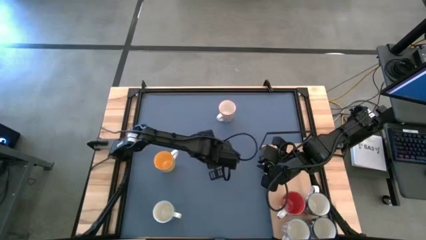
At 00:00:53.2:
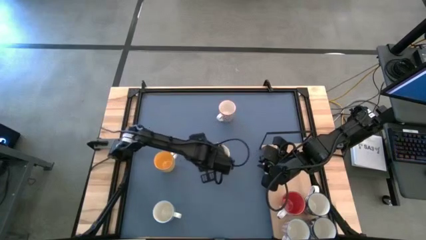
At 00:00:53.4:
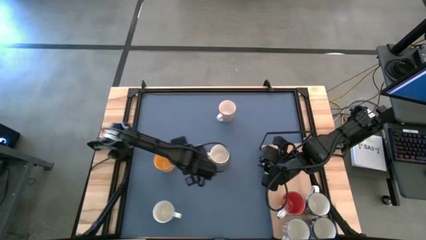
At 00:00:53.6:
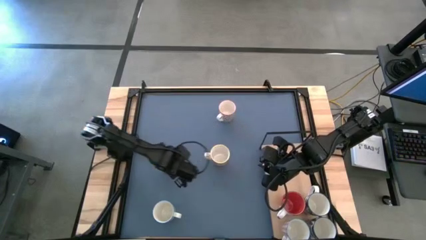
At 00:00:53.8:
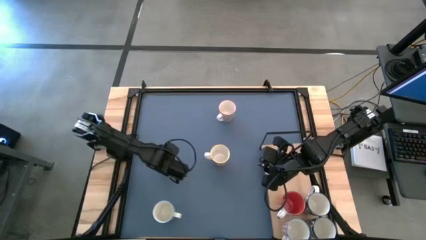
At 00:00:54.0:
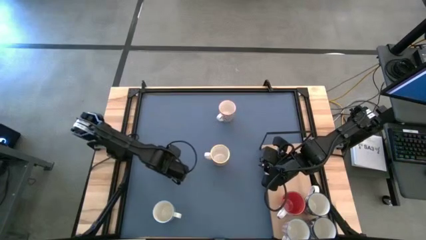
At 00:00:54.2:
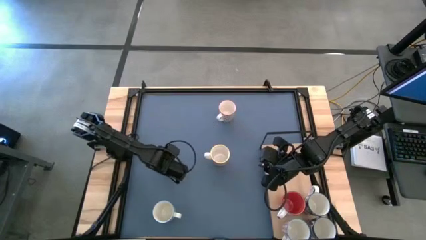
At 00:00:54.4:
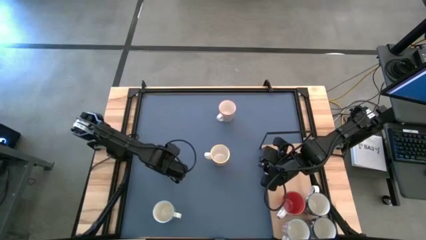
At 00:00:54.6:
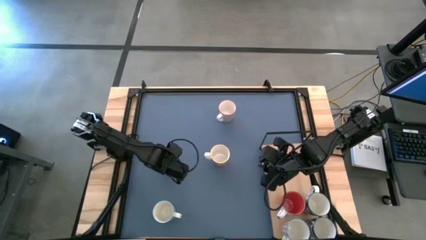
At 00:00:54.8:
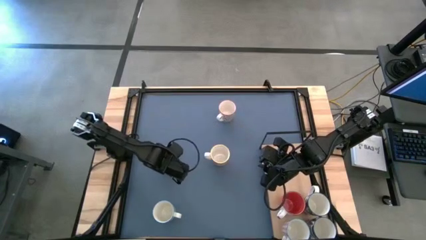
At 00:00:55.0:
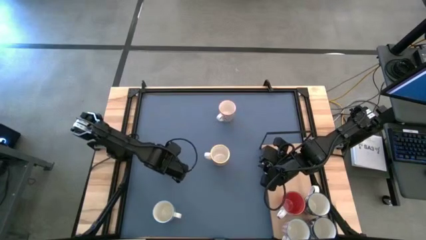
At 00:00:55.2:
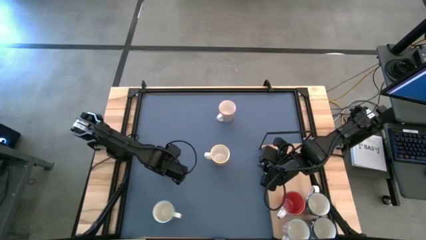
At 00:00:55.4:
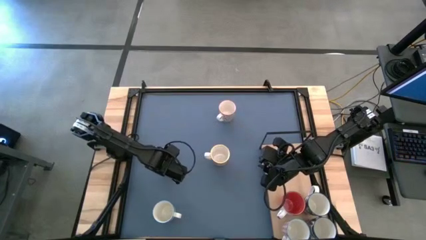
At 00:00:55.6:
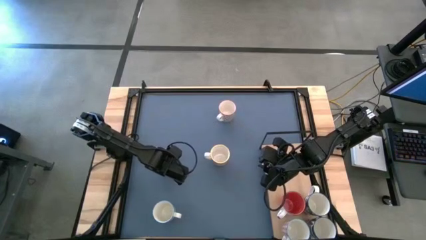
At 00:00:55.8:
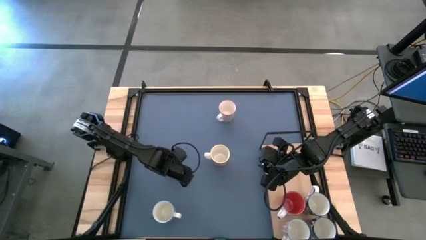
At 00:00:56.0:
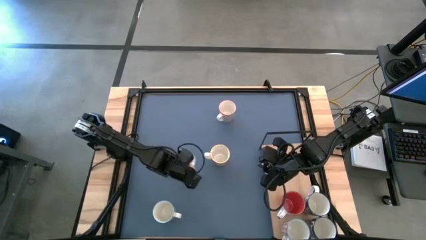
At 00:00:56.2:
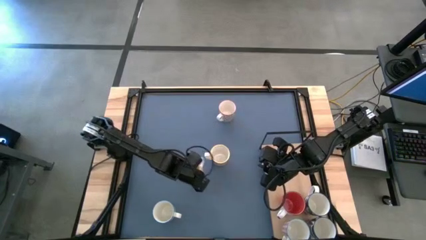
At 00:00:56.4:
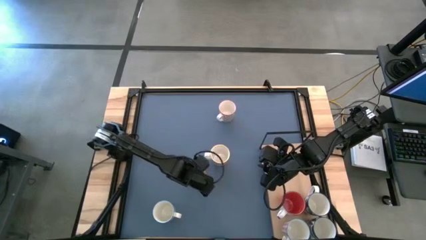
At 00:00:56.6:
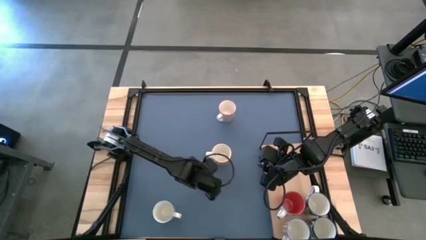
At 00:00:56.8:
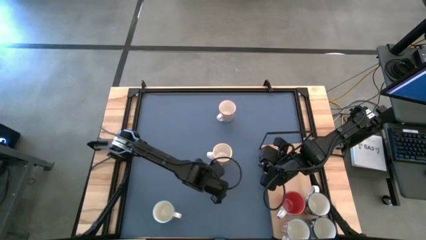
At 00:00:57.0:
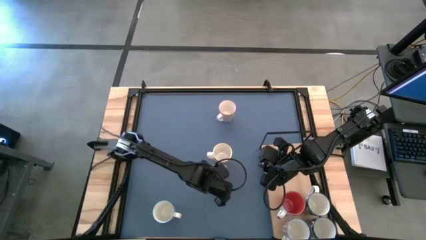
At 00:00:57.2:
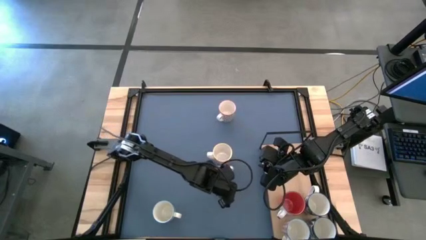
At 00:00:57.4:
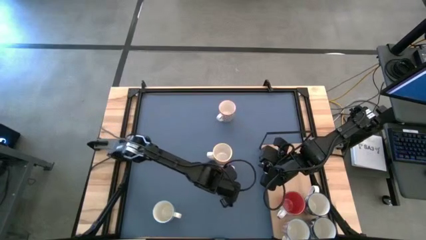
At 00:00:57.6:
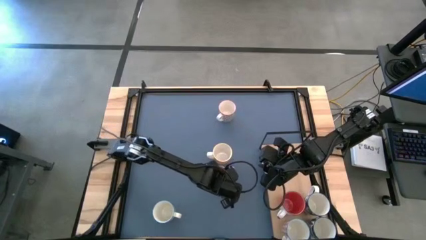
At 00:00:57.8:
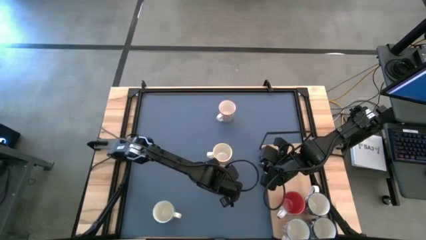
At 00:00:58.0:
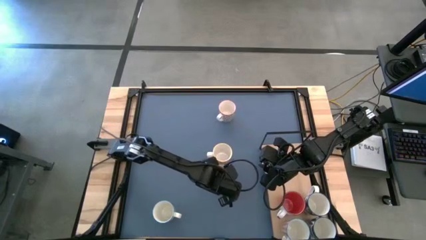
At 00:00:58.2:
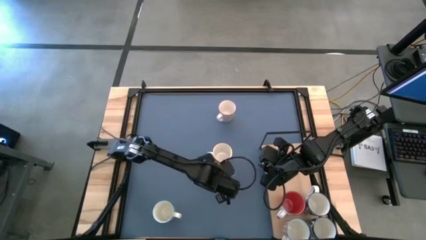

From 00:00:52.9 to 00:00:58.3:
Task: Place coffee mugs
Move the yellow mug to the center of the table

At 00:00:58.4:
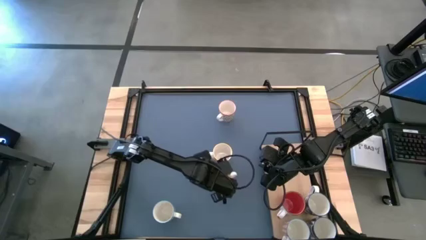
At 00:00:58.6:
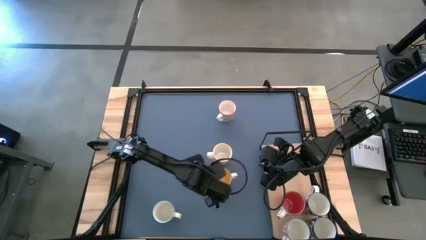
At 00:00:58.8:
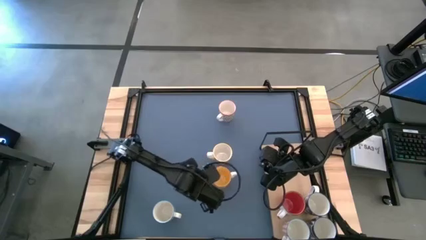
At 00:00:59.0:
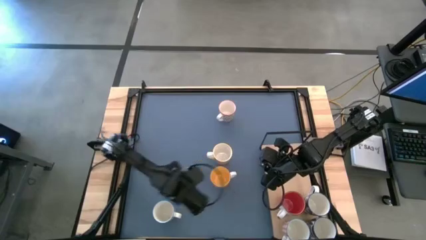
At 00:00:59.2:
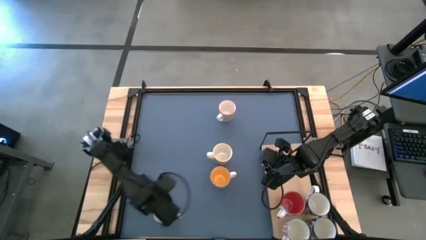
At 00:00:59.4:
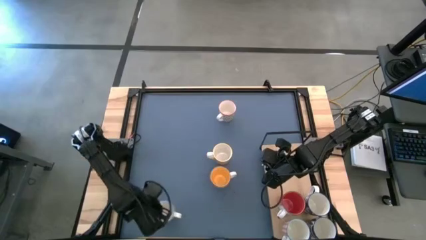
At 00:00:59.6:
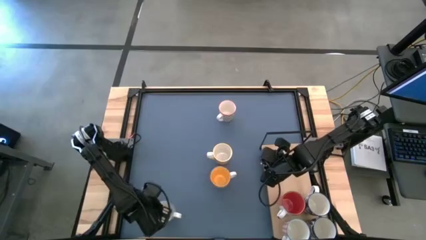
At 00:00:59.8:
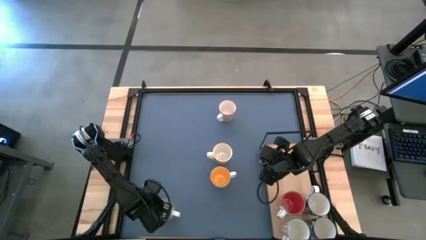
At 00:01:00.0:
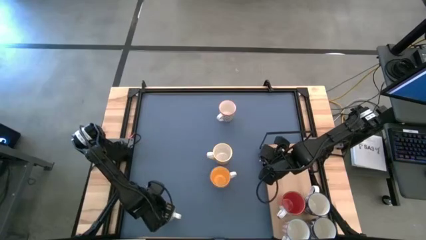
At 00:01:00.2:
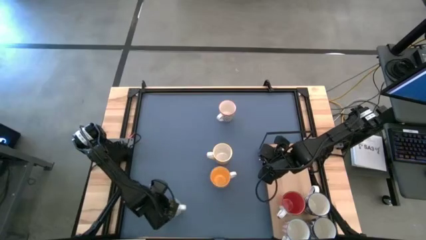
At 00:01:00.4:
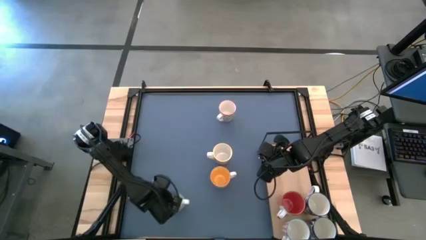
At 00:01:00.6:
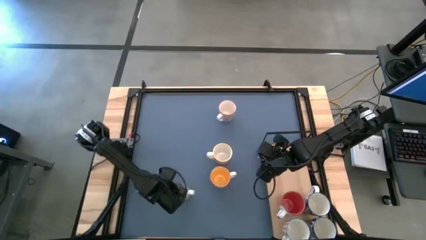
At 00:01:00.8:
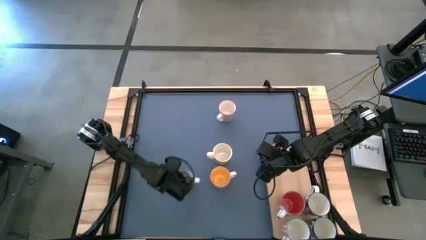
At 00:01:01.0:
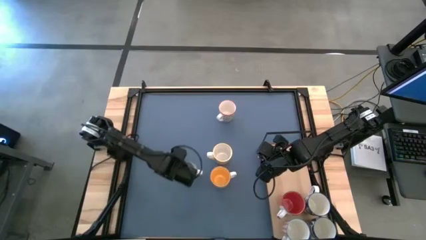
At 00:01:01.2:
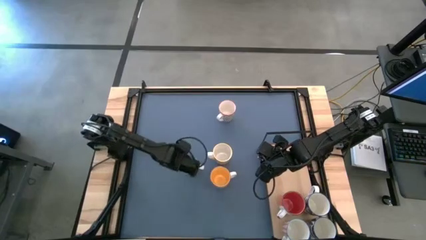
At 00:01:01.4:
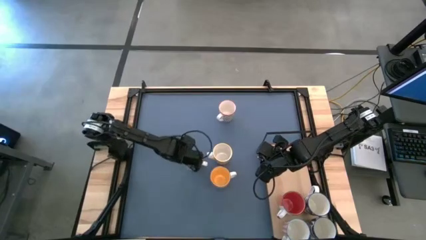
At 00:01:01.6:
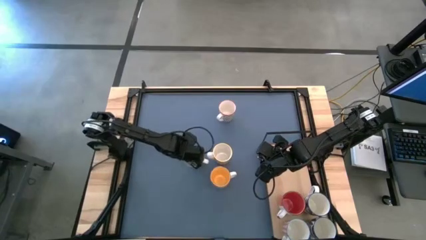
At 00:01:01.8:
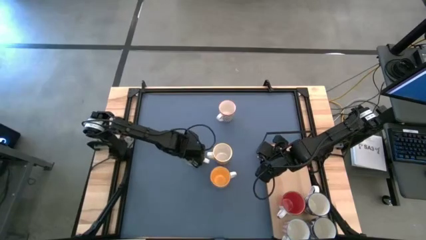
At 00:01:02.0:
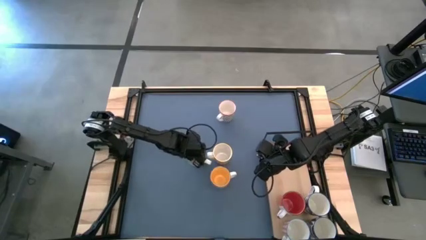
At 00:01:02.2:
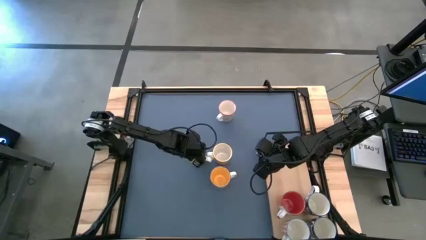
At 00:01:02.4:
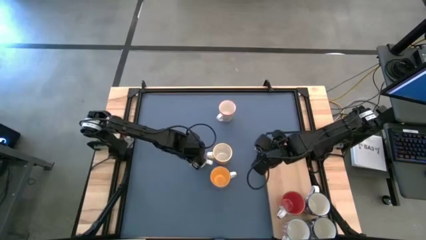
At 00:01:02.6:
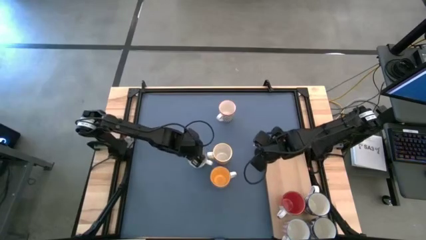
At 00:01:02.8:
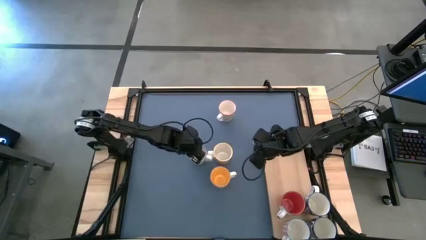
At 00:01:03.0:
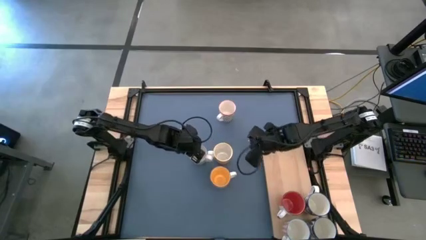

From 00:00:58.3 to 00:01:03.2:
Move the green pattern mug to the center of the table

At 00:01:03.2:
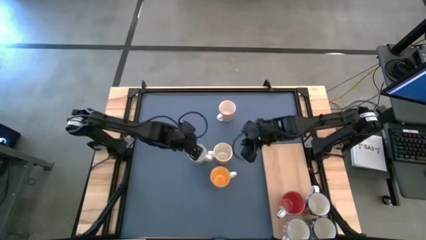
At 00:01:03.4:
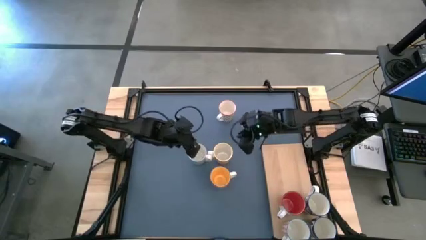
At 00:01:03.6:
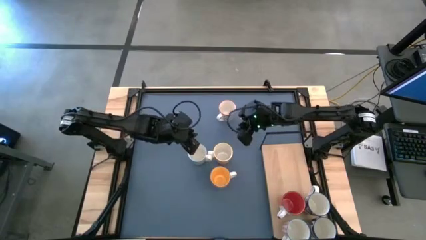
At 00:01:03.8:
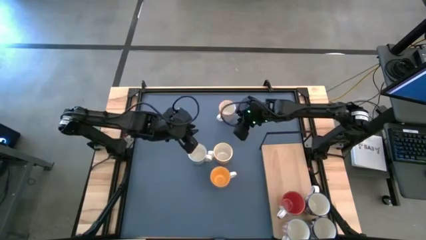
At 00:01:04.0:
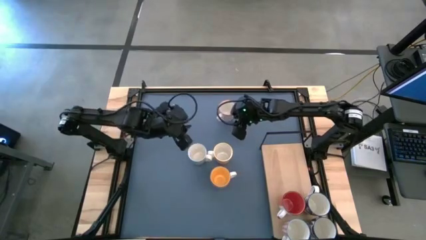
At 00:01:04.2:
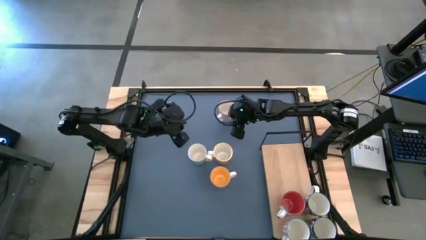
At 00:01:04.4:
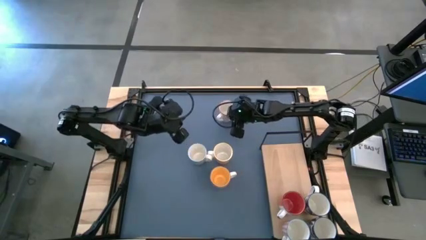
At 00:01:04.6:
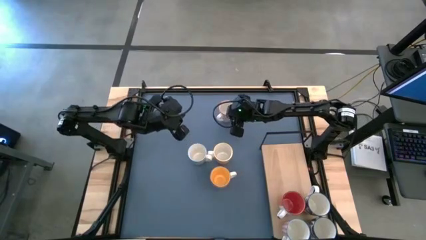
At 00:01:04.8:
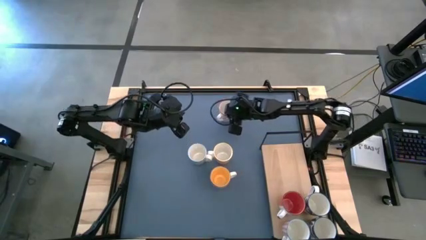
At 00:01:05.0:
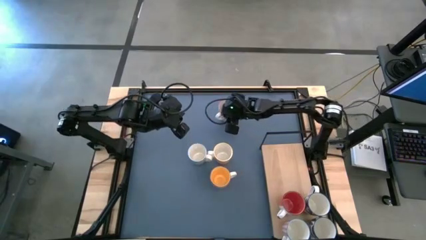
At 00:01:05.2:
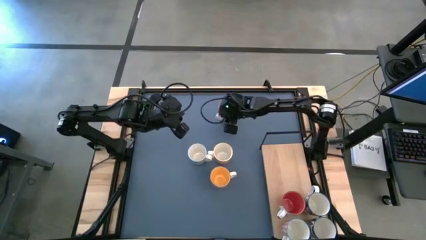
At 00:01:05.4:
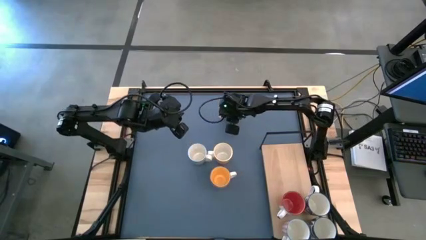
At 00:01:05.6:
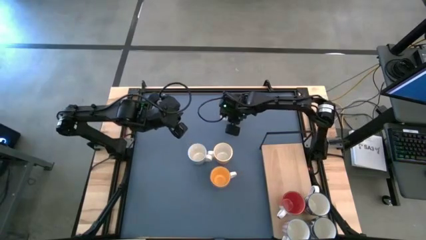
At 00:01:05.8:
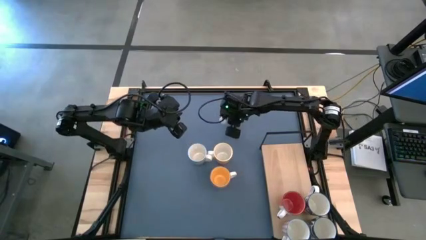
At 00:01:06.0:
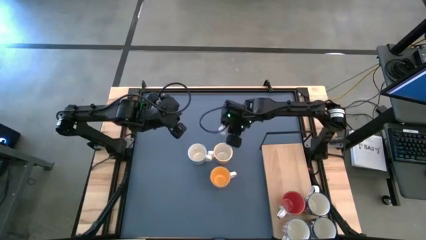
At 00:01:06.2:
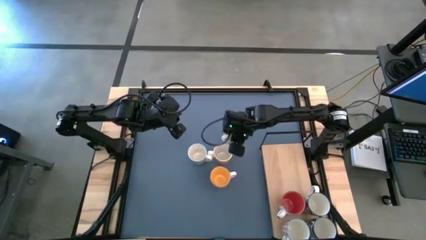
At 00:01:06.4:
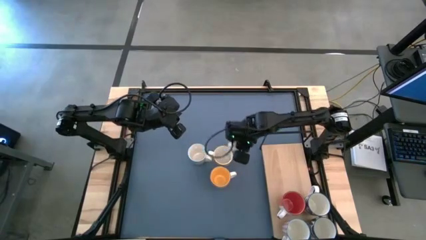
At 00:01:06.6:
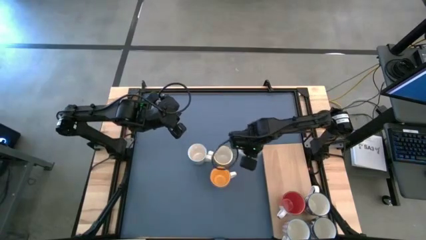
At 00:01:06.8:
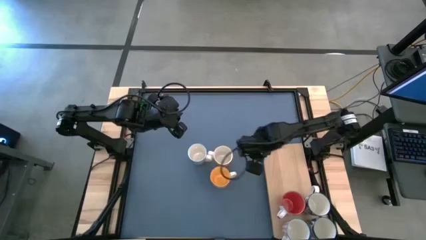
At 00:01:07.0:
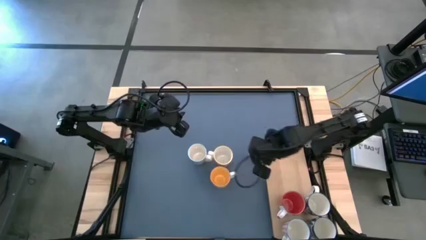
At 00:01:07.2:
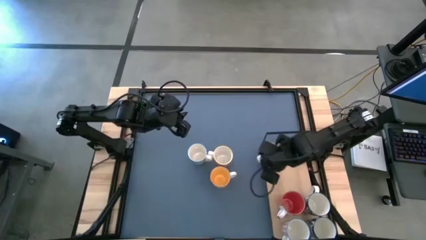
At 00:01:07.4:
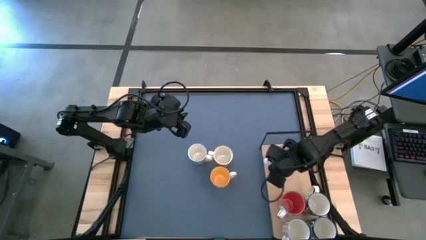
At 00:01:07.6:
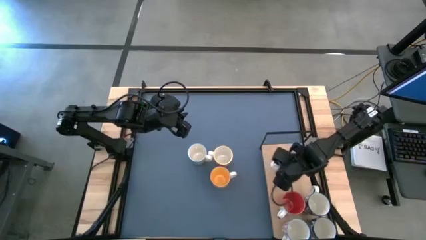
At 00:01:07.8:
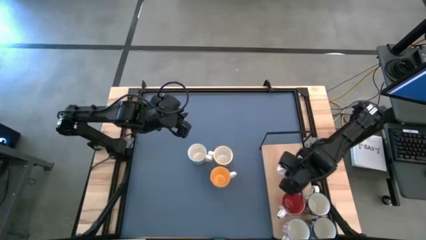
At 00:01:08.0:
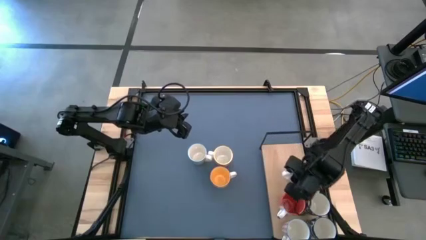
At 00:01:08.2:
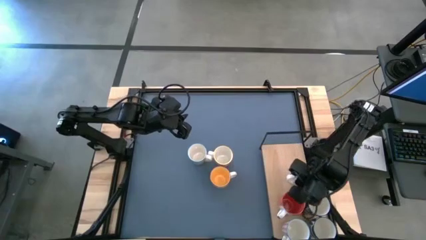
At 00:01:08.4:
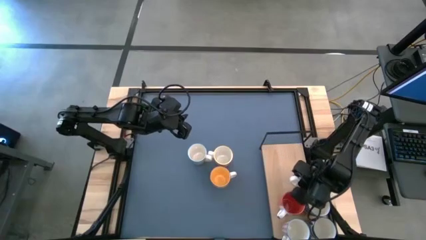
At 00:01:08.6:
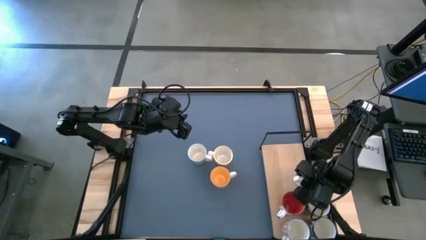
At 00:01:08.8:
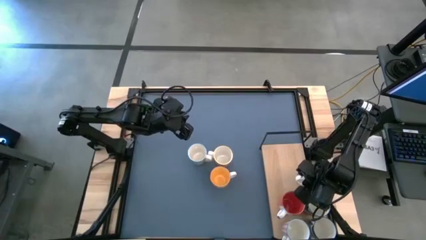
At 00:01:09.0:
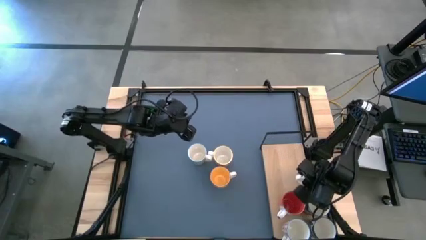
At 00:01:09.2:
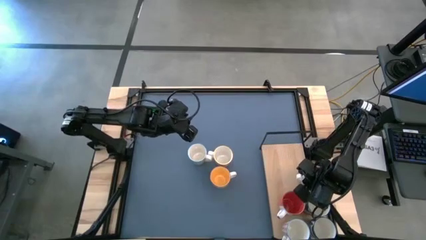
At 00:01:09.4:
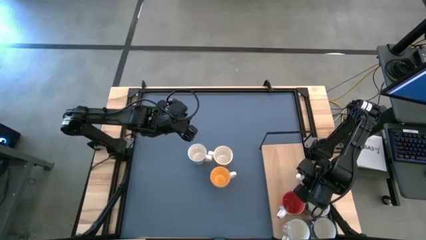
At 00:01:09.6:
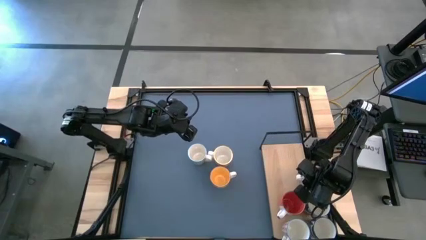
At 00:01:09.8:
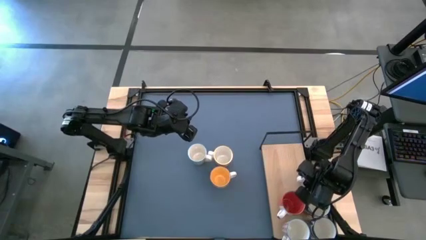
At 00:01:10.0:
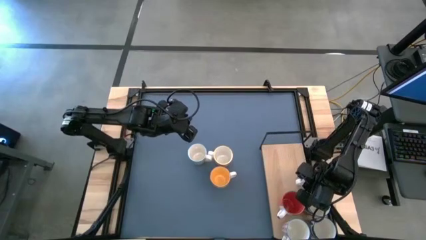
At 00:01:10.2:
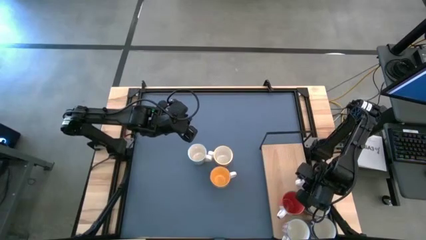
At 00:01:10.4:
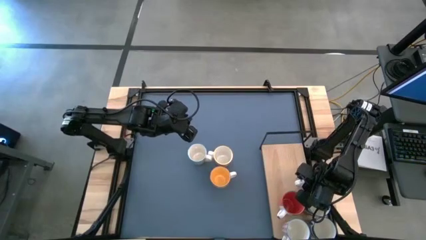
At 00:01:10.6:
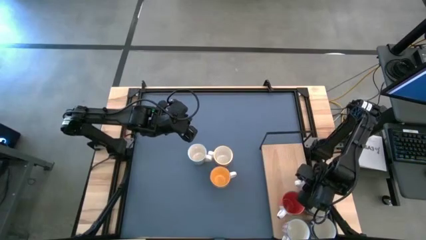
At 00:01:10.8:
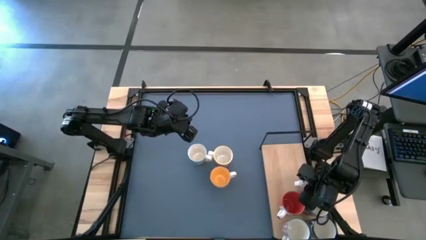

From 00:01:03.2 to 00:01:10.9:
Put the gray pattern mug on the shelf
